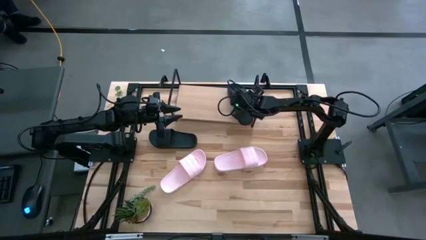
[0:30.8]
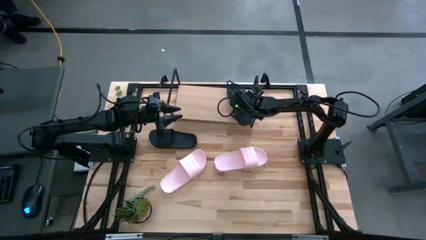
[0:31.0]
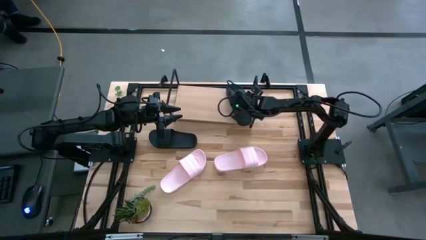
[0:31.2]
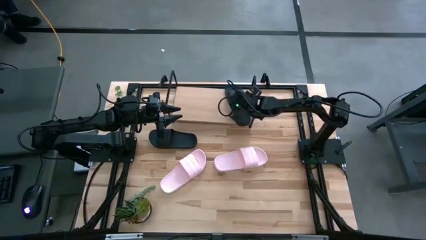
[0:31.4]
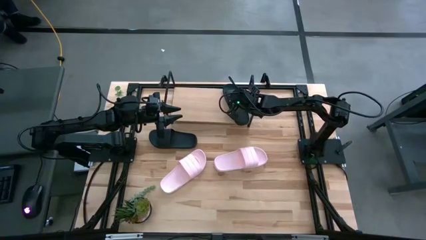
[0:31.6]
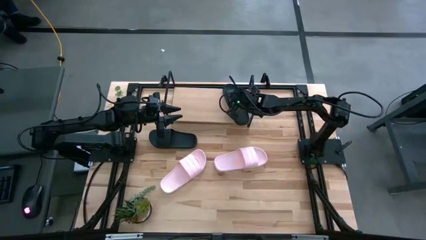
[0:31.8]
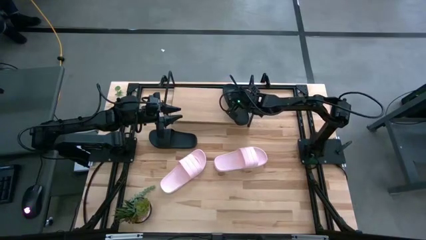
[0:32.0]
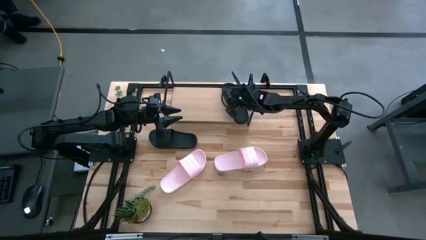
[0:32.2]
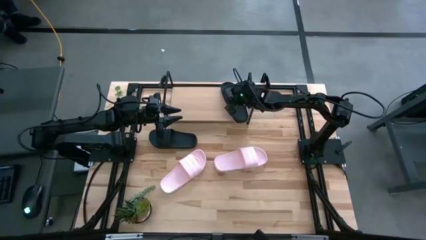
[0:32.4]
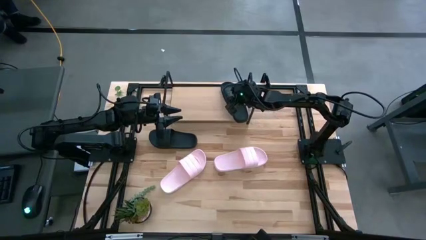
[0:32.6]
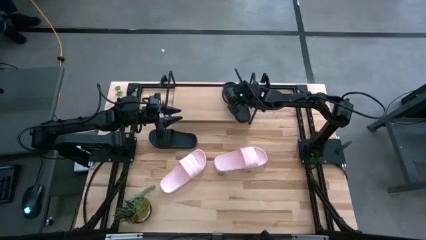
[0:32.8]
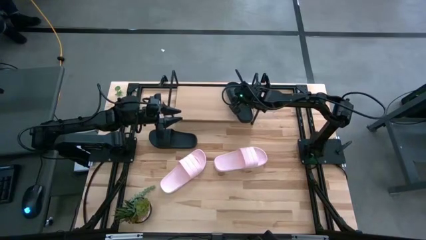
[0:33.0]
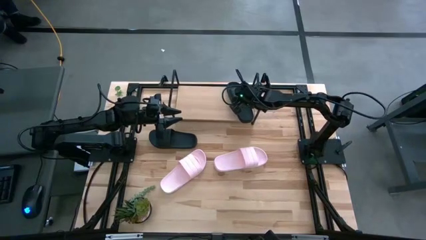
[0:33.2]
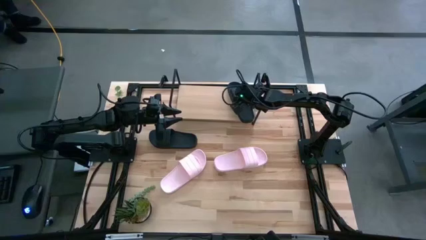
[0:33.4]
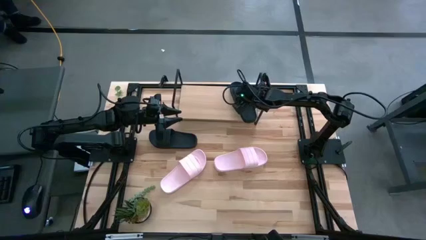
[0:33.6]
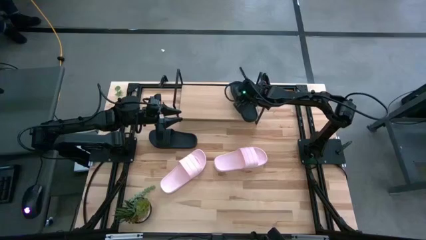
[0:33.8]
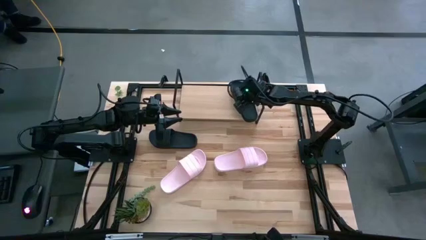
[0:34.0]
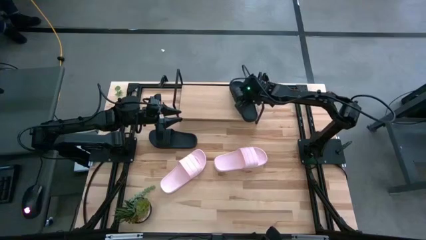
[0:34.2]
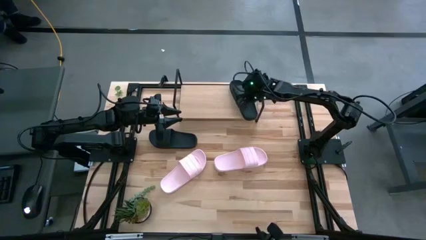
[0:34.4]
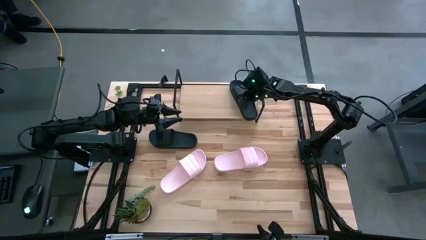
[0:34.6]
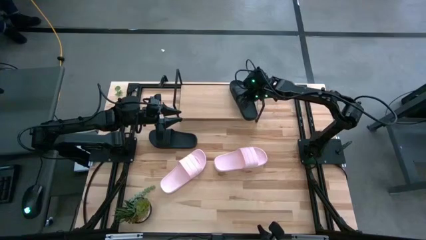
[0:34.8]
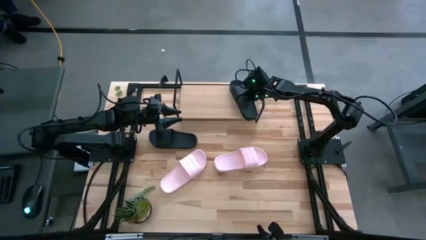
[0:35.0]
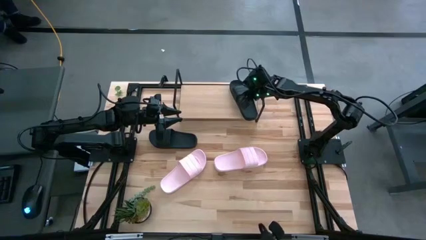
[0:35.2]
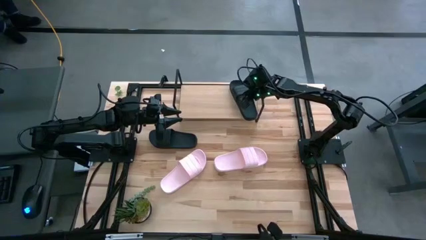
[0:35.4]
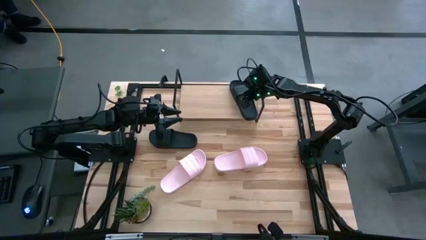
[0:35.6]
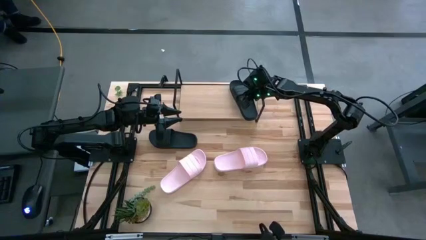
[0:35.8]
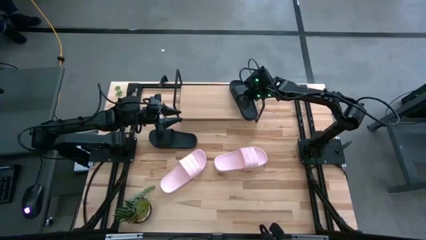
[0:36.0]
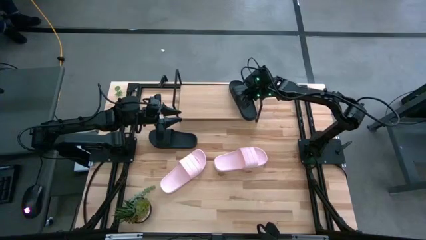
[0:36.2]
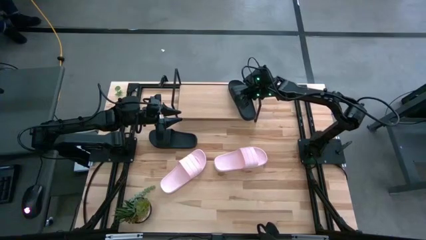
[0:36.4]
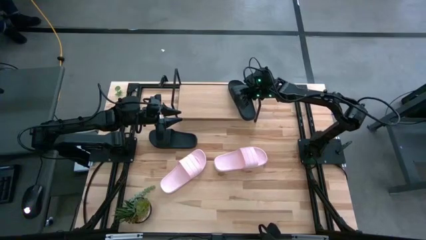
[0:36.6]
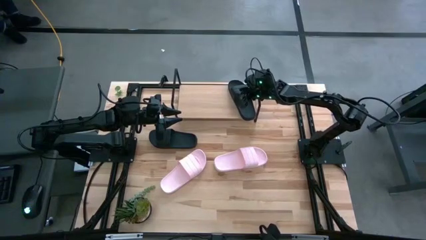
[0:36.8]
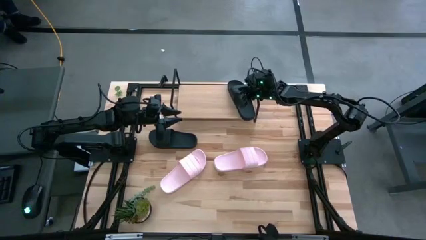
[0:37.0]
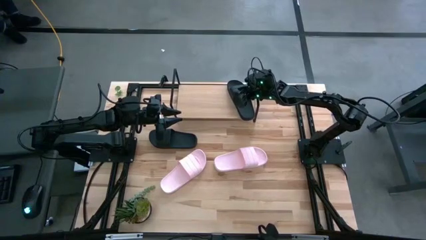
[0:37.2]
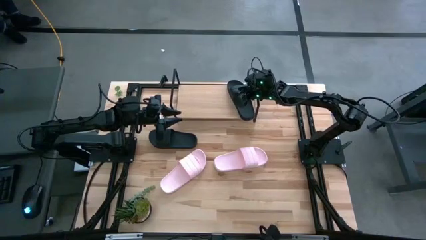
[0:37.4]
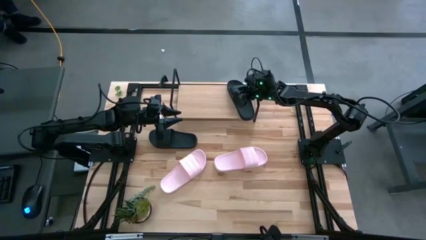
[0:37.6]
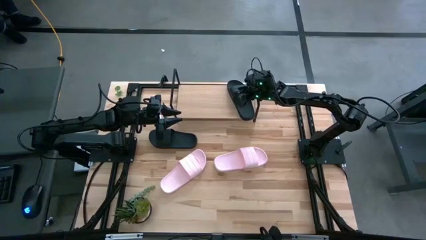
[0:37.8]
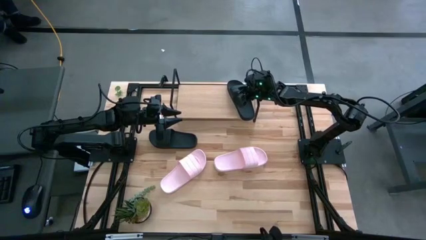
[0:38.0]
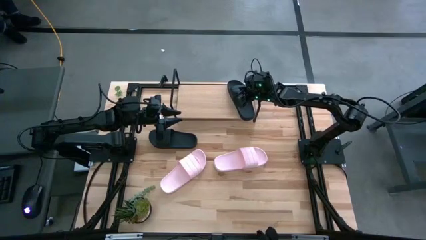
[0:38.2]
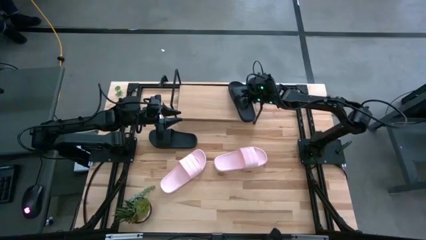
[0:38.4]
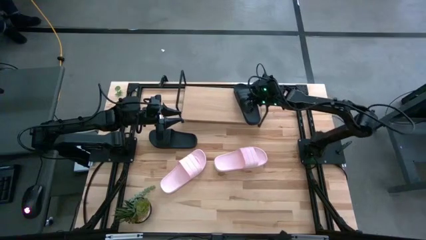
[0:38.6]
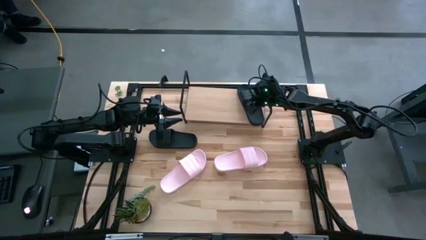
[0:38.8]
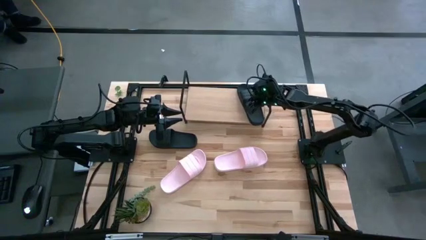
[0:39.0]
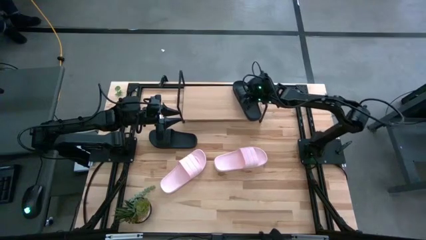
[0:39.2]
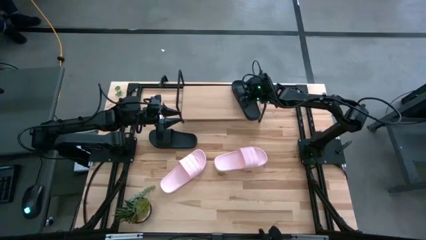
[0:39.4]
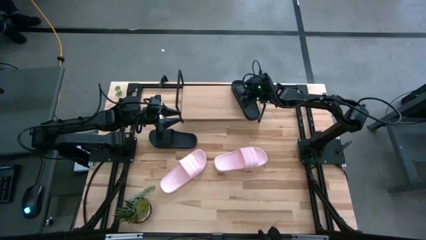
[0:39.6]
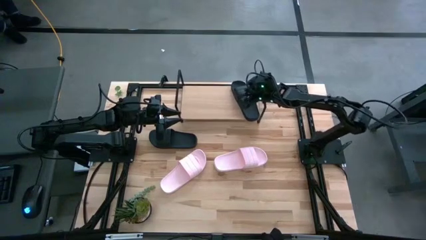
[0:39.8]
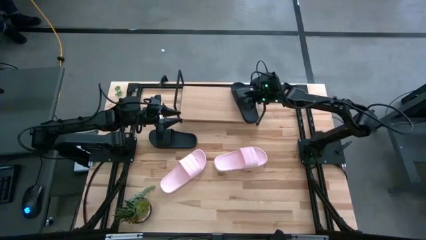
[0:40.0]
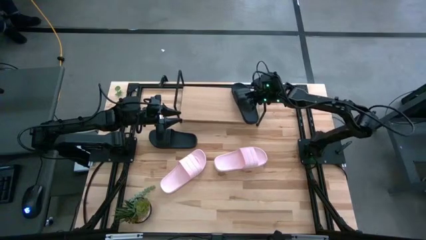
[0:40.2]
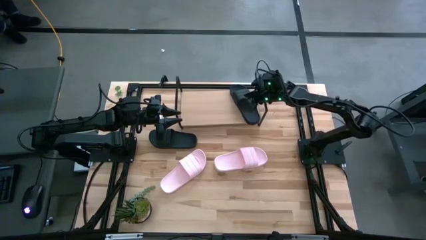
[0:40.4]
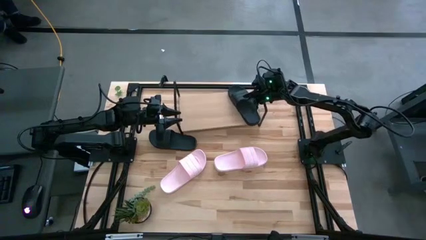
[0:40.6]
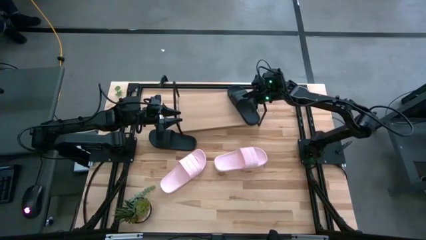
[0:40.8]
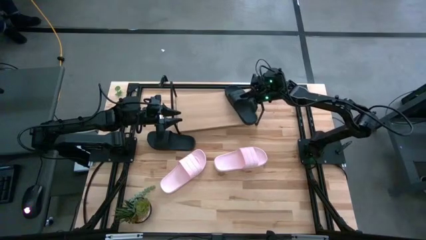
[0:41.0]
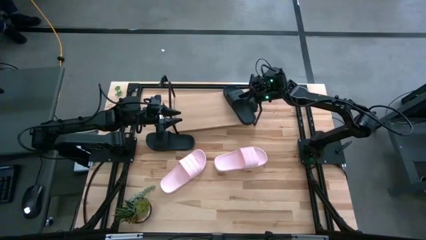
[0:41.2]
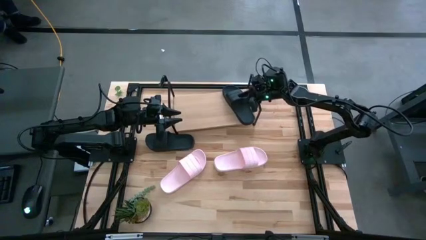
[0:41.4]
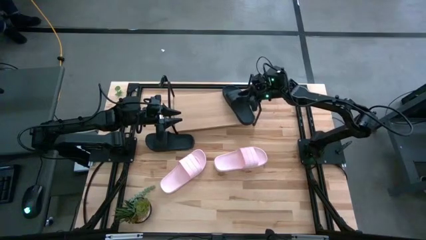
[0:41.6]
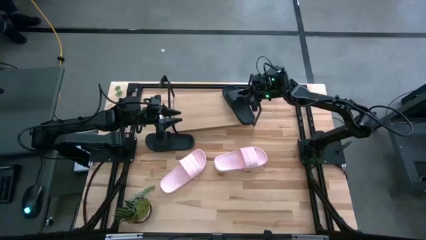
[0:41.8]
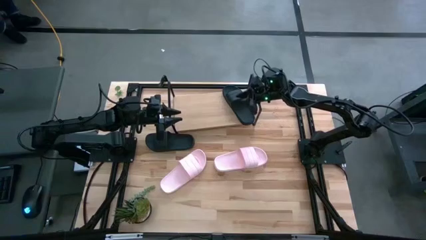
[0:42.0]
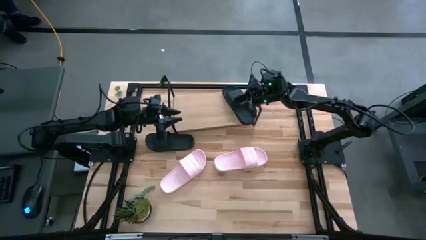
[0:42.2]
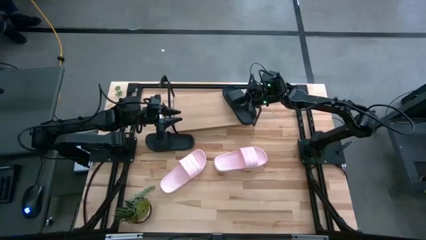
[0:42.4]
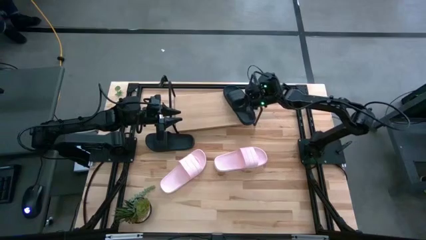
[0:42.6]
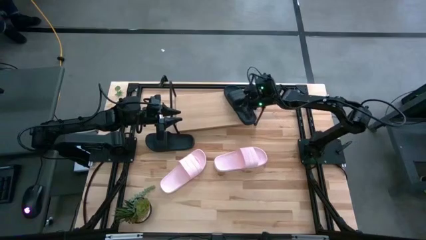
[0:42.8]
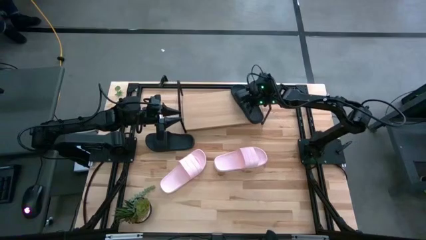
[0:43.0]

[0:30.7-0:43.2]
Task: Pick and place slides into the shelf
Adjust the shelf

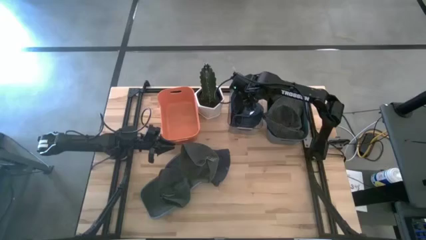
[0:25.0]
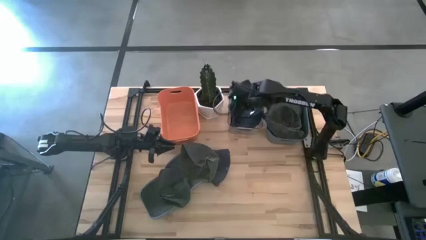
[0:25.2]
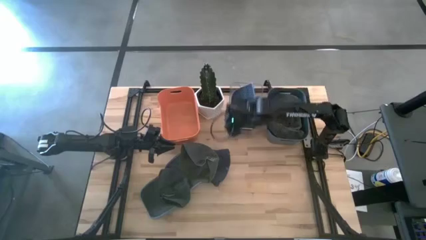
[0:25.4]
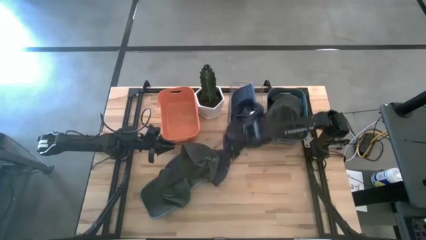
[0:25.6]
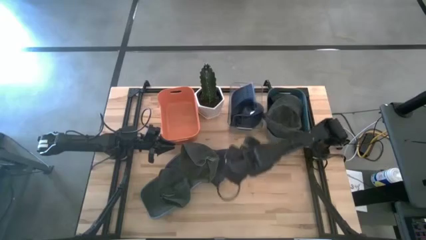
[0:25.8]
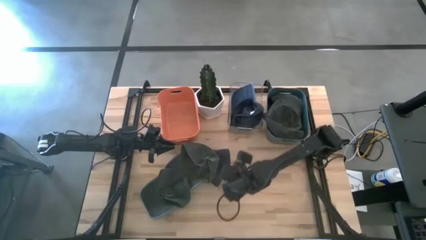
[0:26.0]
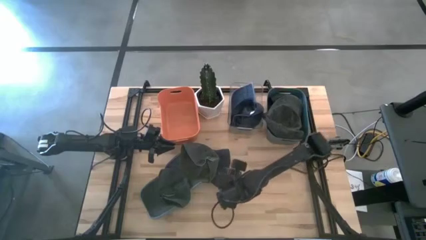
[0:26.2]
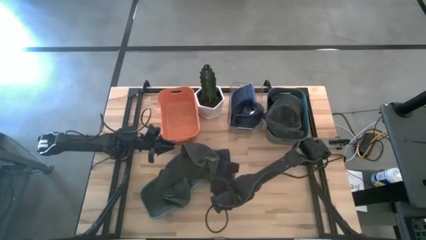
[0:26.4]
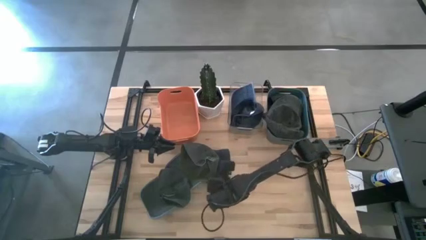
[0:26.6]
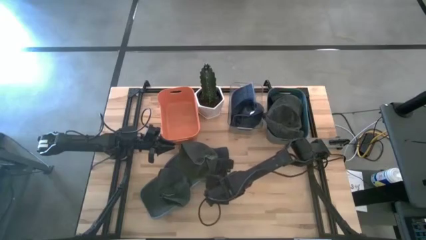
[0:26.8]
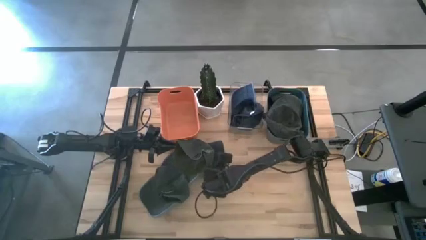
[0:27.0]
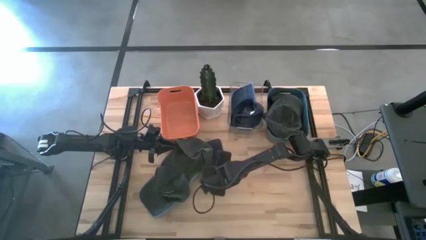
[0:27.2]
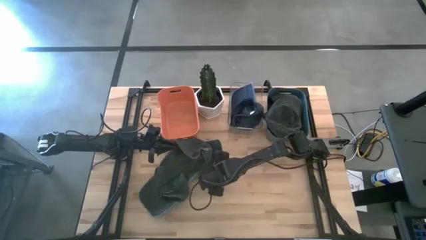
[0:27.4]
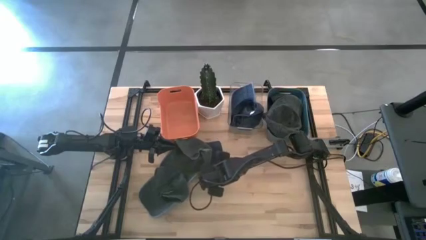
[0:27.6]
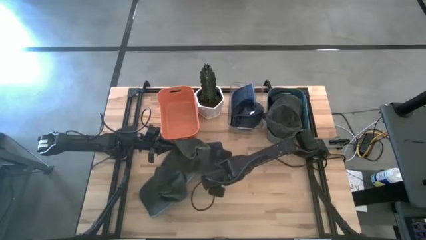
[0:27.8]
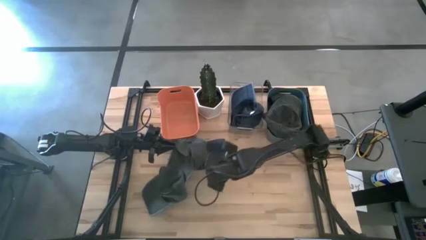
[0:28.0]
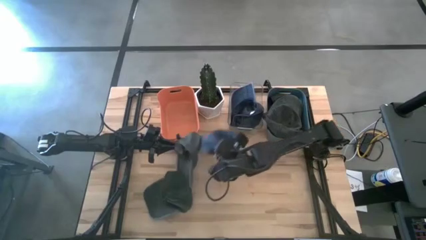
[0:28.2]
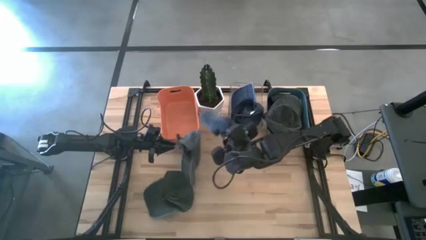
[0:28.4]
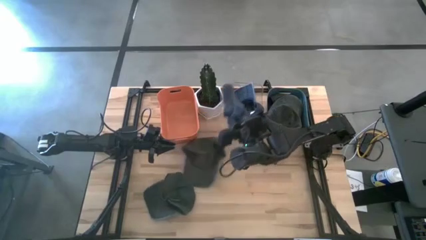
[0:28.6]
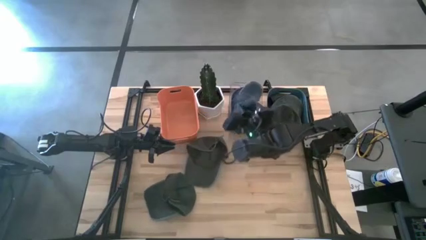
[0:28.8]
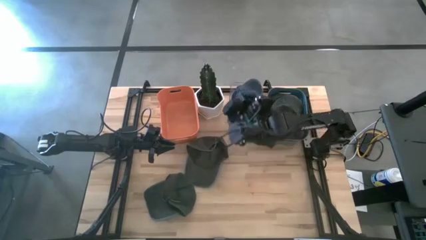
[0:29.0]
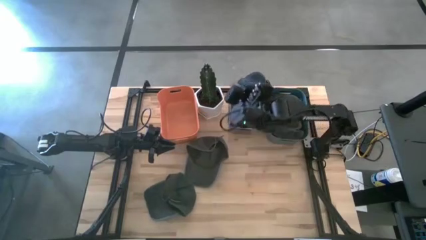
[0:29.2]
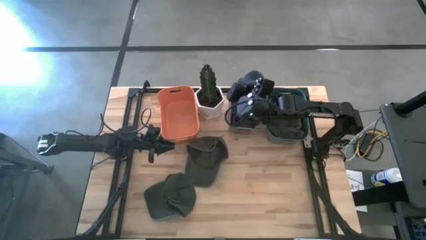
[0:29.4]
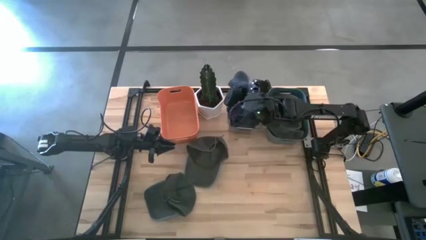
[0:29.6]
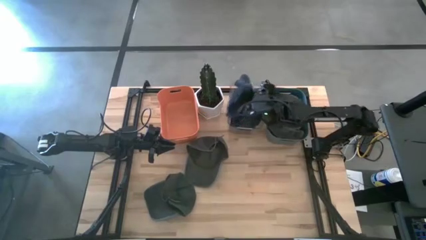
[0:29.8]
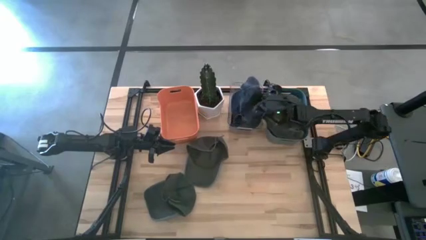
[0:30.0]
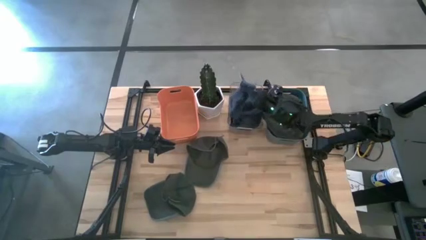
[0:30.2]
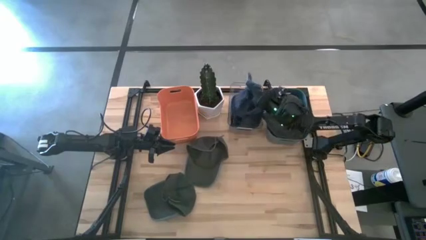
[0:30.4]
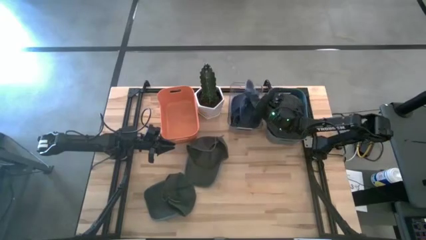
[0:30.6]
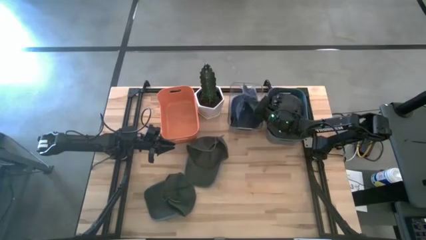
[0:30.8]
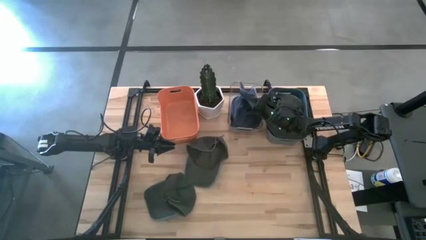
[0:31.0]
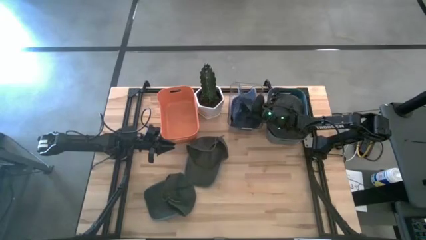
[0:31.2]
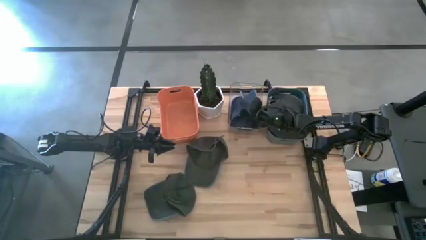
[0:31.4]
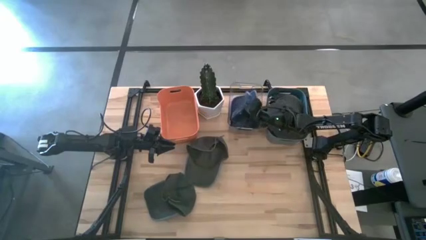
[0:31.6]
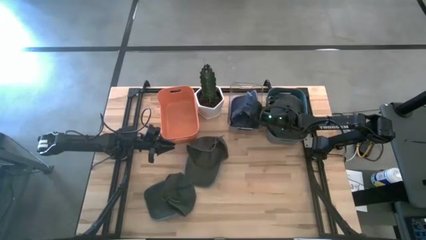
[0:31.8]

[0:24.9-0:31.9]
Task: Pick & Place hat
Put the blue cap into the transparent bin
